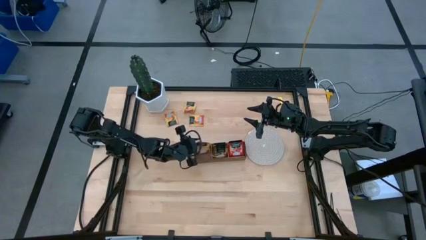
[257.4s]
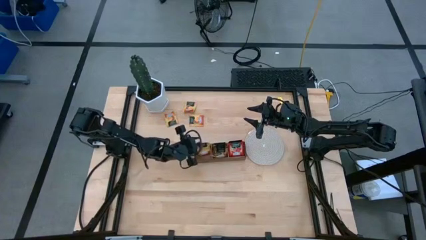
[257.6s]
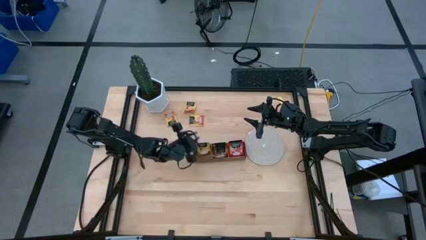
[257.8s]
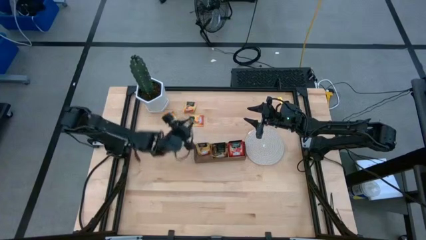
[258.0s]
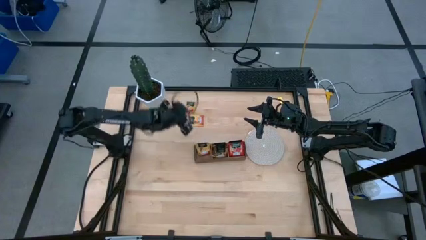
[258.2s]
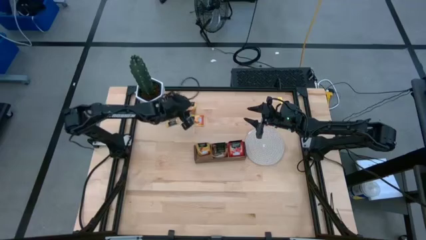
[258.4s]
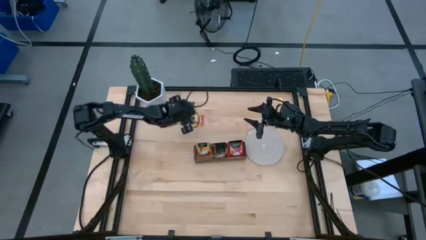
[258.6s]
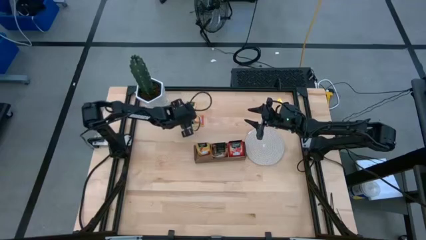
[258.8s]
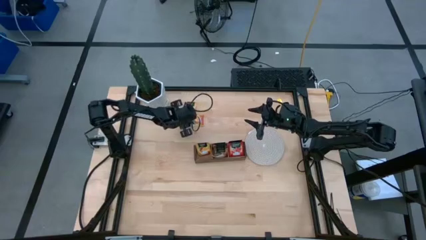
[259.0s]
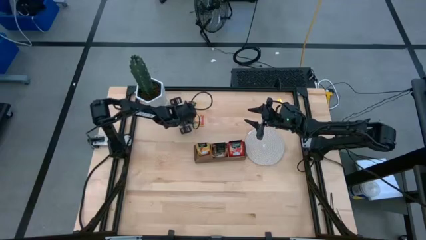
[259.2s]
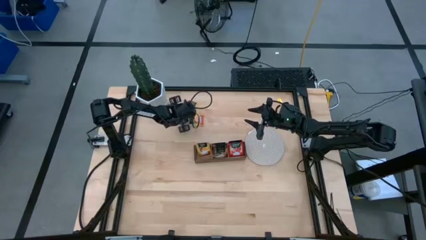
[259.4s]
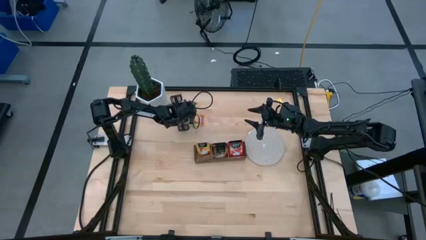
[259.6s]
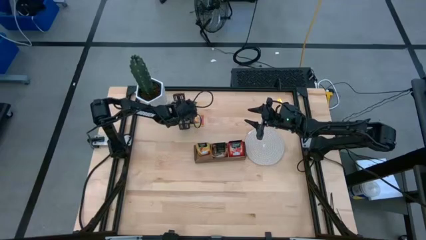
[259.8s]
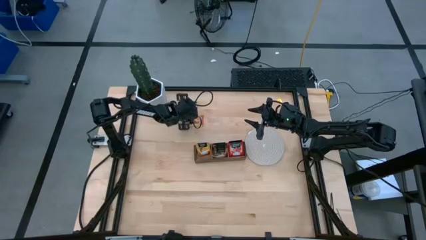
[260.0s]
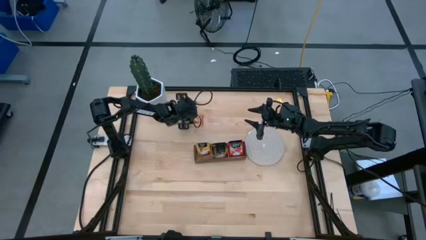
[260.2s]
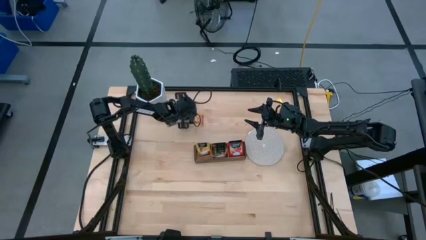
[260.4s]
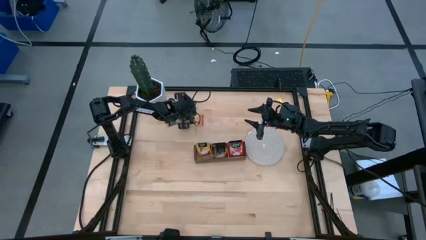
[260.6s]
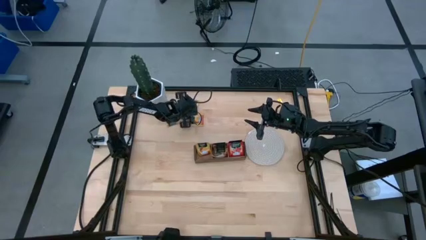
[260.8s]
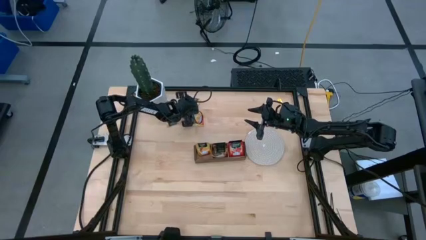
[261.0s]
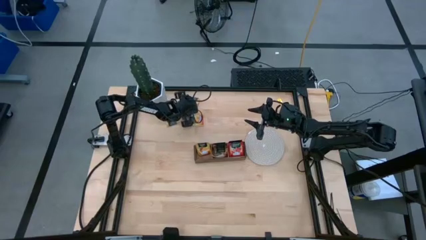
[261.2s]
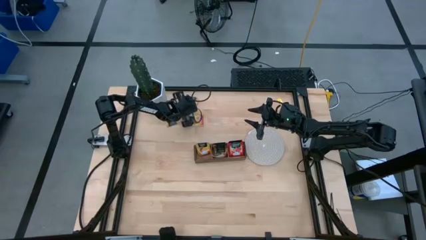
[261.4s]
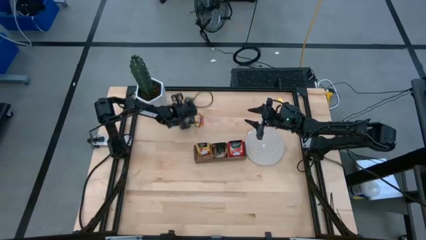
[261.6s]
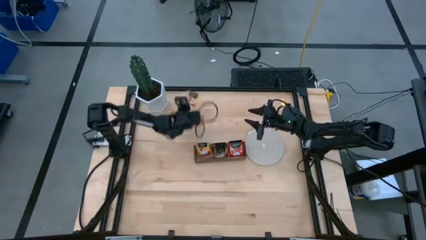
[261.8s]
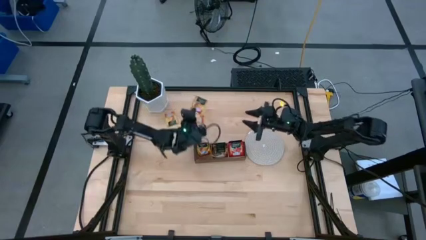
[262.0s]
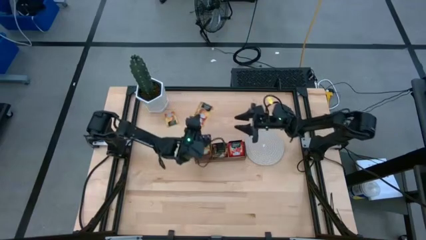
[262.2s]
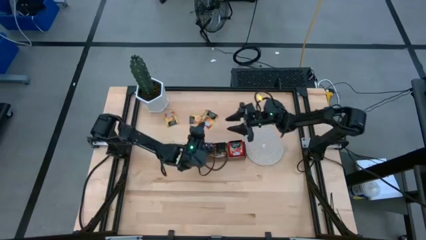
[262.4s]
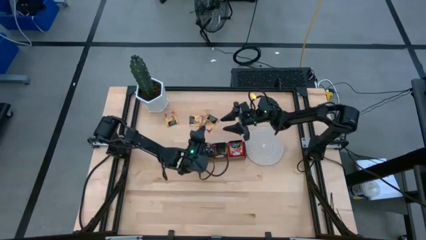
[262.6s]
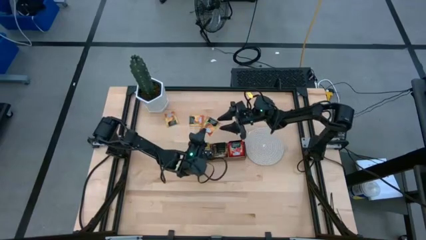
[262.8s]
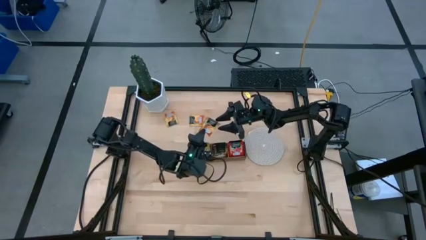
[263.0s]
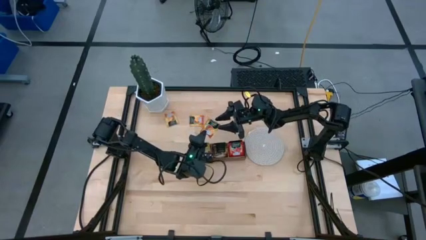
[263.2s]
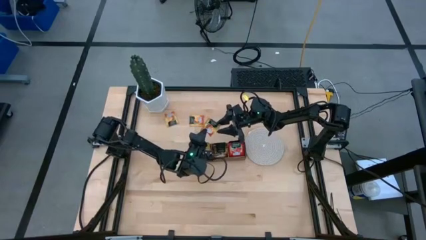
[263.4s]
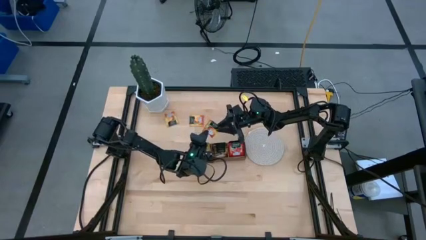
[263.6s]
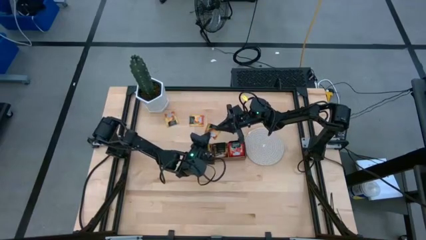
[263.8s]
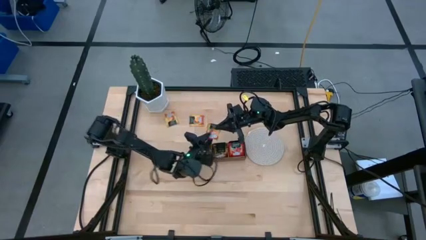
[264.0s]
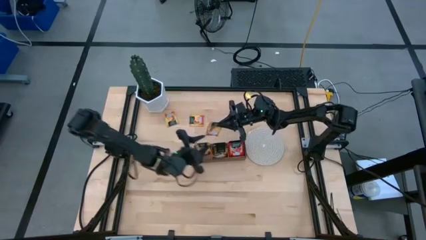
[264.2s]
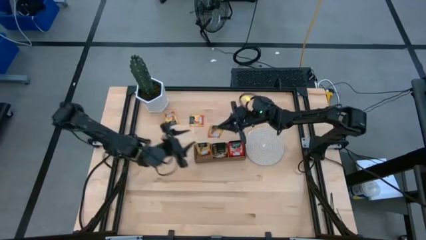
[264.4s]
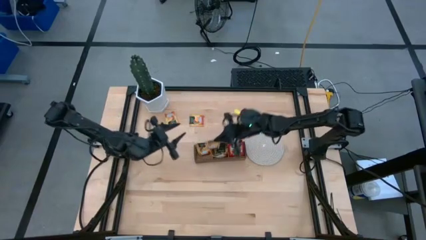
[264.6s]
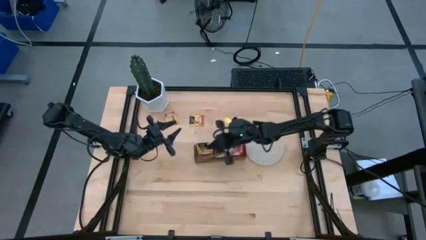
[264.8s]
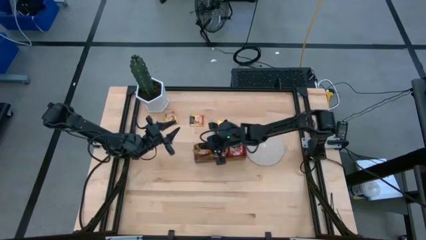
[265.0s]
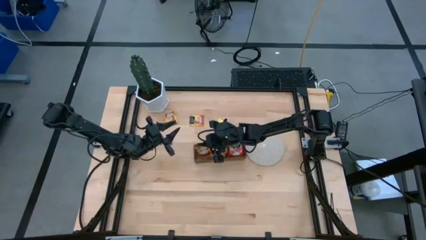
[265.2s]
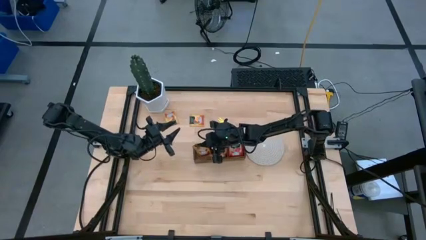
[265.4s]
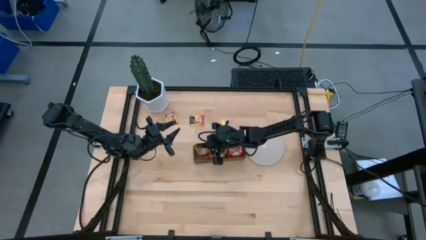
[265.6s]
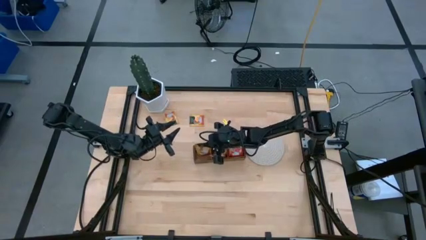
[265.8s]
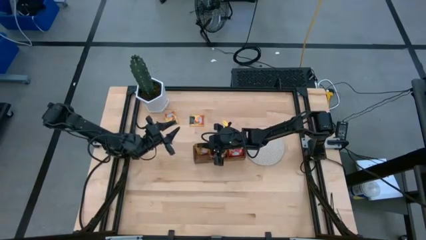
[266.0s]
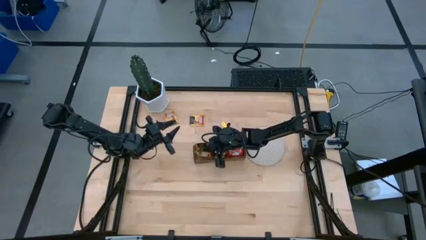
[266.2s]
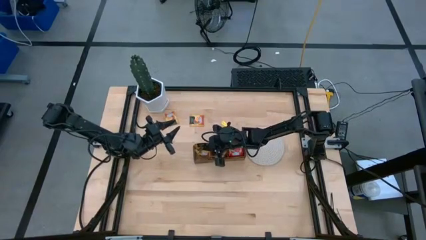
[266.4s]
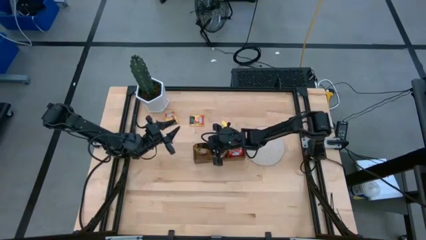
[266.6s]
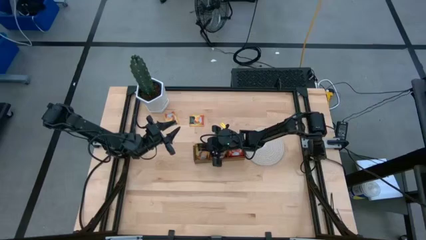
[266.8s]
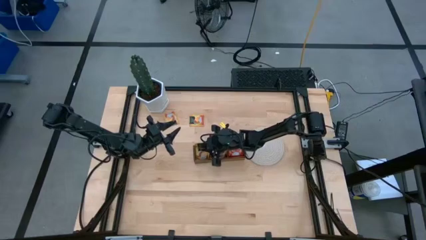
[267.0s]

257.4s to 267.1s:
Task: Pick & Place Tea
Put the yellow tea bag into the left section of the wooden organizer

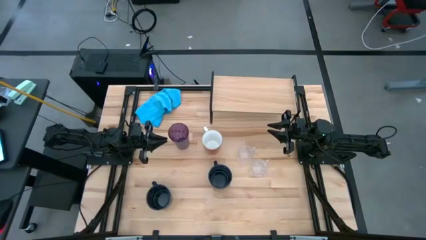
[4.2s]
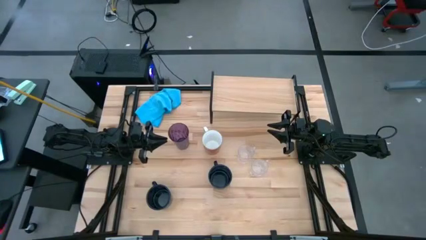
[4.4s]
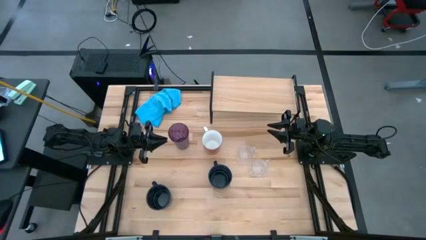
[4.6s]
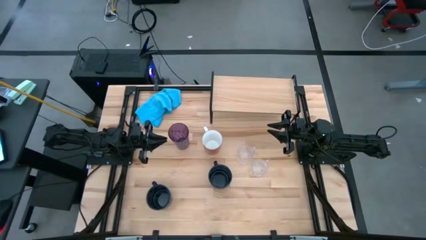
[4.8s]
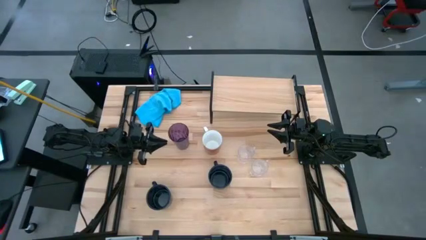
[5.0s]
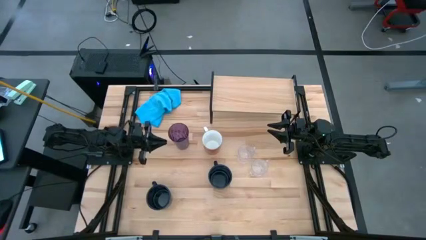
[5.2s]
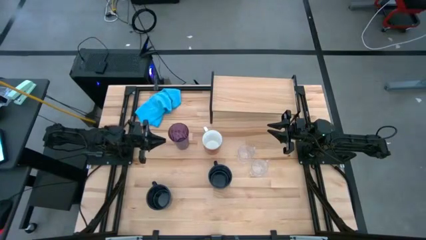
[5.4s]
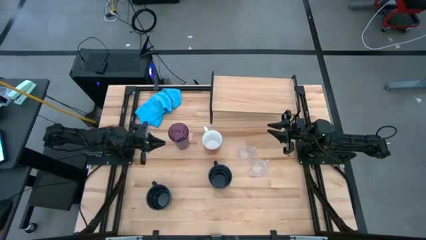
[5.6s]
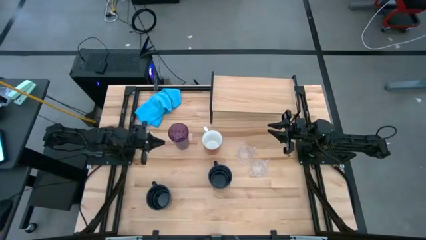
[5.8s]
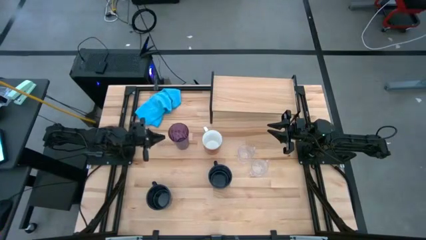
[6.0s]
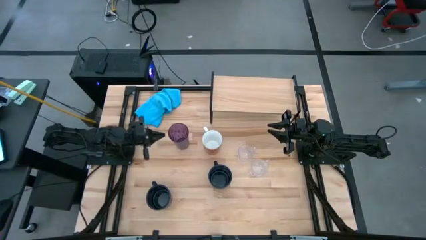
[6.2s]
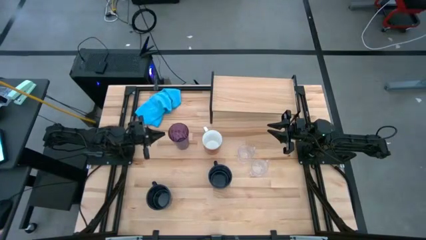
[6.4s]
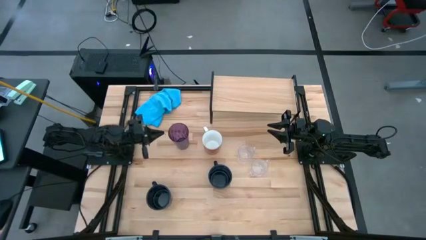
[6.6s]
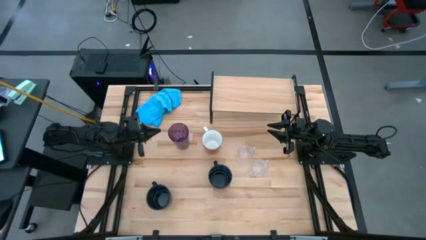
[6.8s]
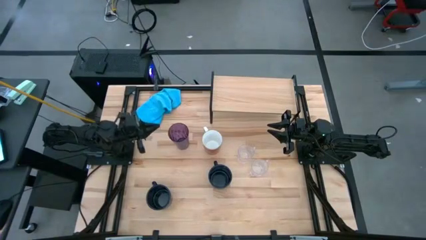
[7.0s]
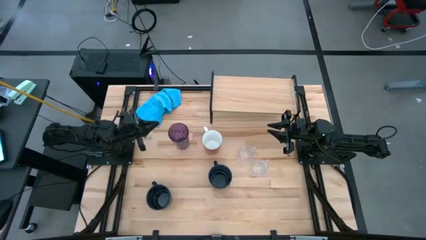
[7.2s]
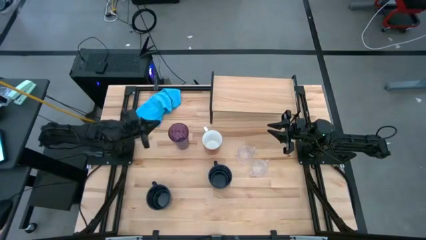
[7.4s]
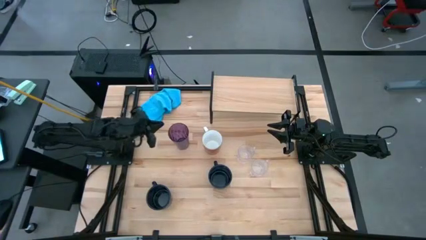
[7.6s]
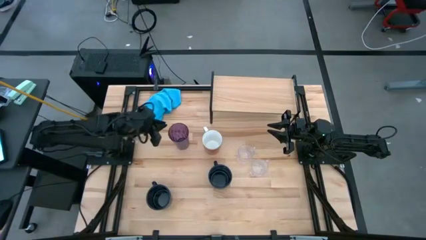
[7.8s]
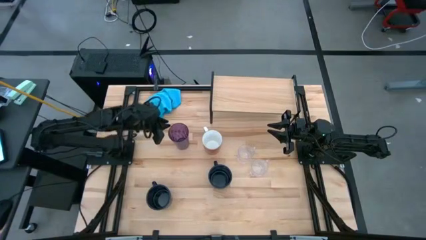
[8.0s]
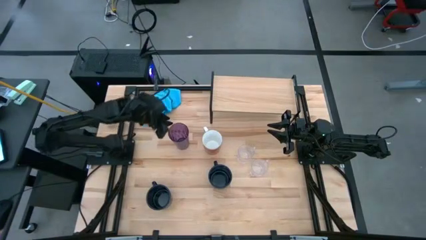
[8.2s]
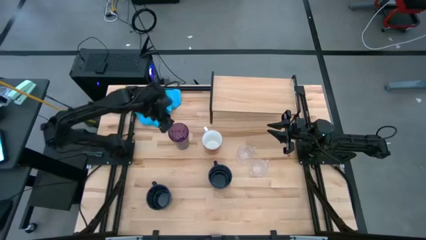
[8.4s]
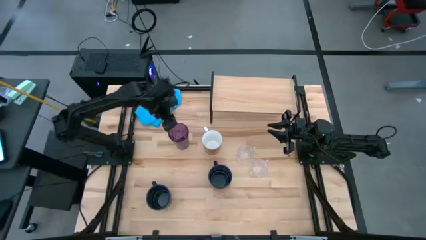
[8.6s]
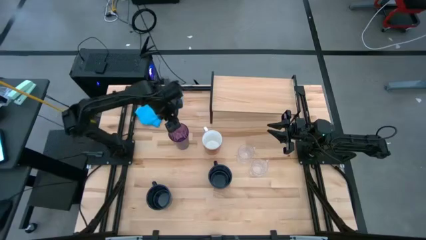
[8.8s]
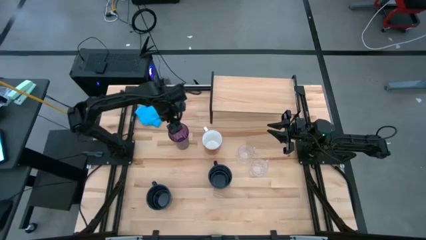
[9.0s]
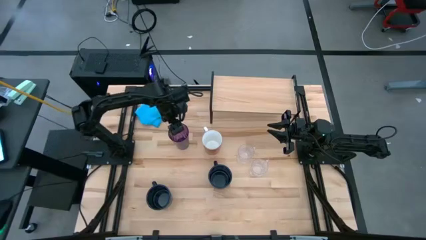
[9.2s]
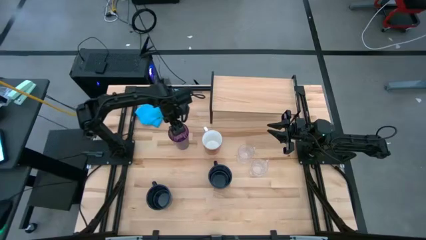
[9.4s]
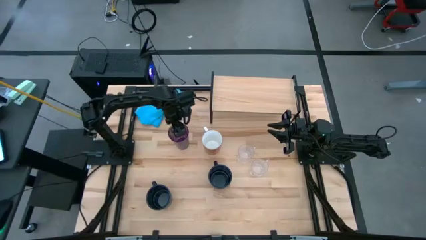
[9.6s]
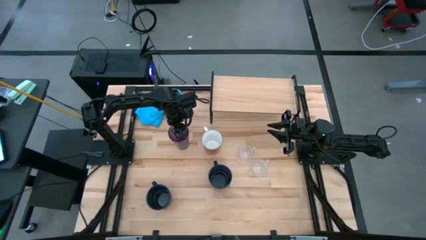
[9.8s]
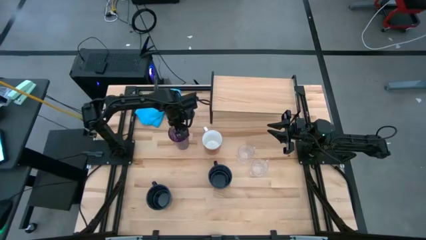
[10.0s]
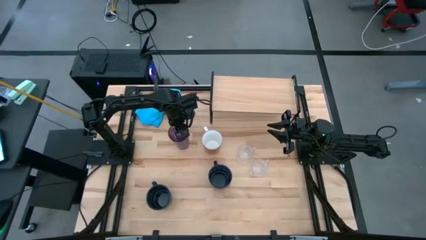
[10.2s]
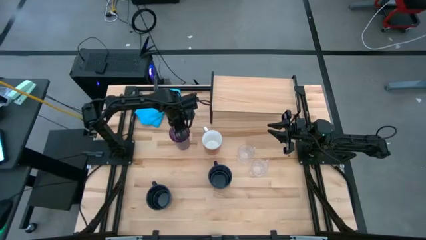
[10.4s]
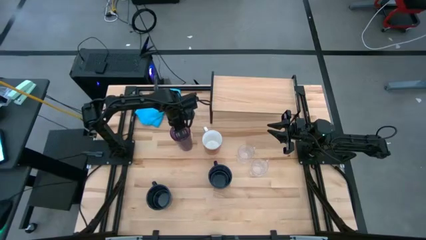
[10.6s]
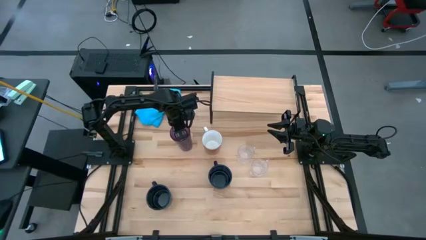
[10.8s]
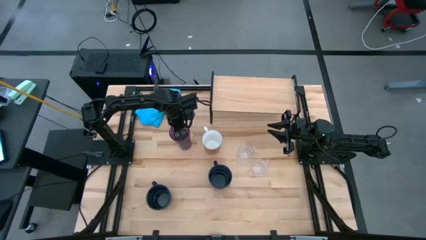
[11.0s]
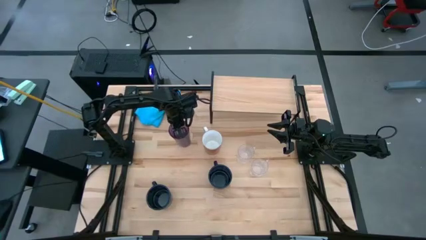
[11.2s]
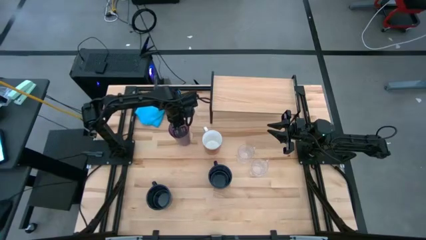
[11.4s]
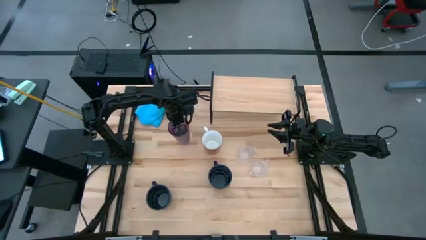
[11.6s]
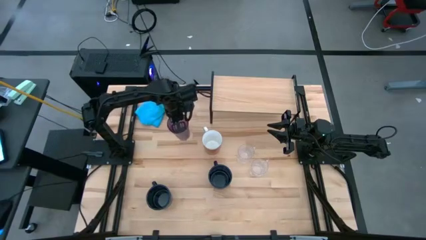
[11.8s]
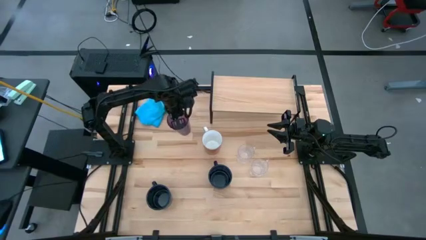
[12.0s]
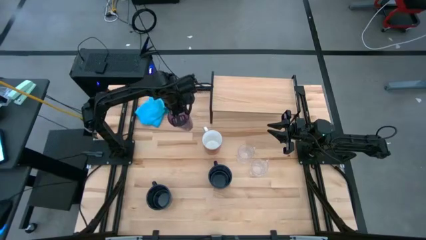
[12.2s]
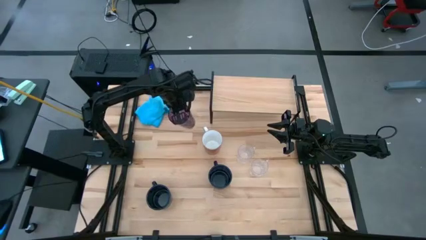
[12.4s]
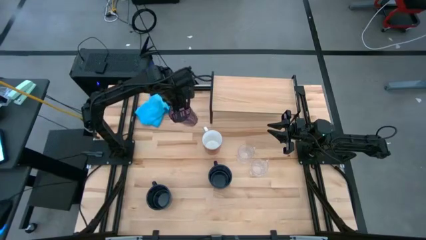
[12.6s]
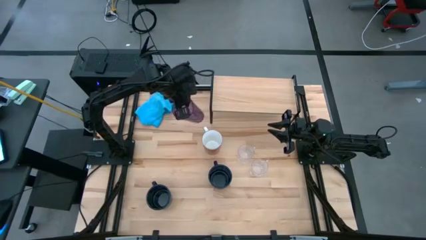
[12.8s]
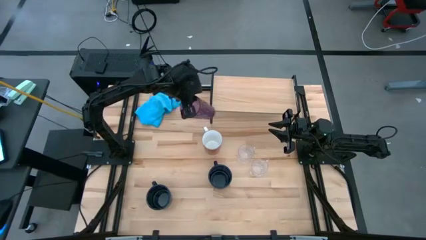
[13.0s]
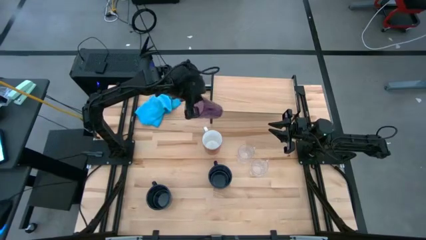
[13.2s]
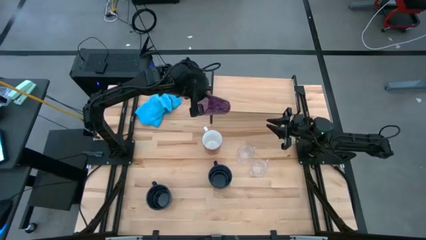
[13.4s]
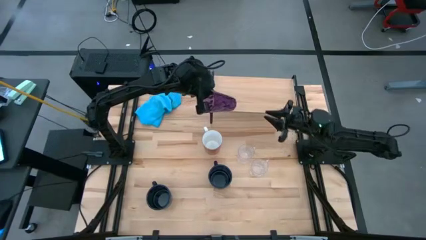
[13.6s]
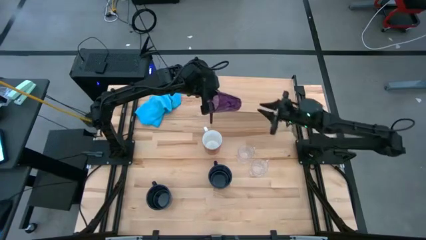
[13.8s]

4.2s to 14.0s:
Task: Stack small to large cups/mugs on shelf
Put the purple cup on the shelf
